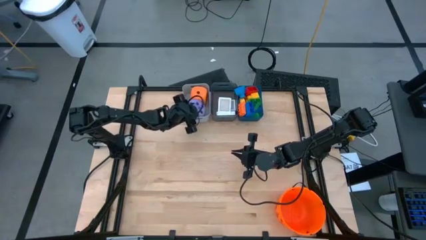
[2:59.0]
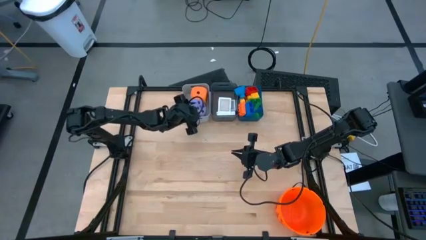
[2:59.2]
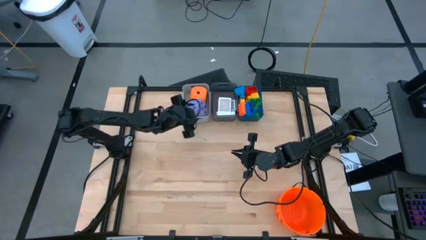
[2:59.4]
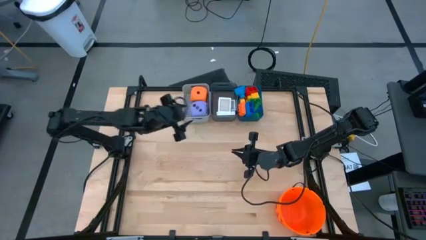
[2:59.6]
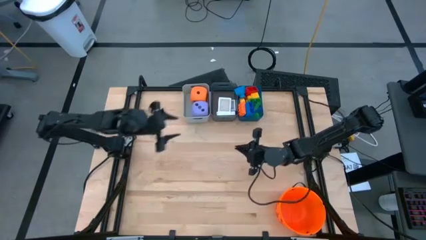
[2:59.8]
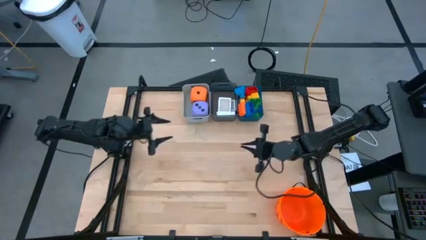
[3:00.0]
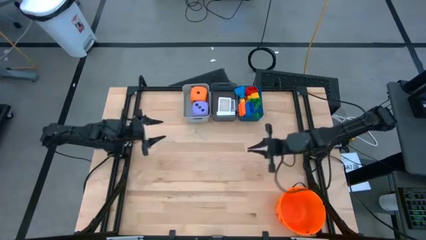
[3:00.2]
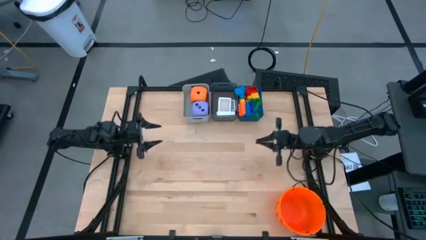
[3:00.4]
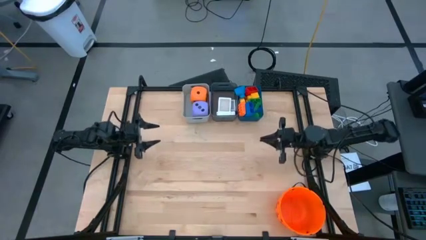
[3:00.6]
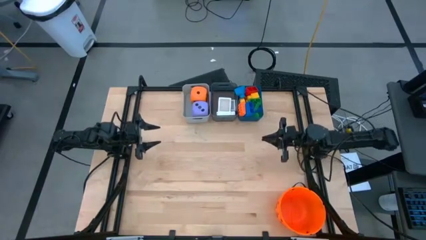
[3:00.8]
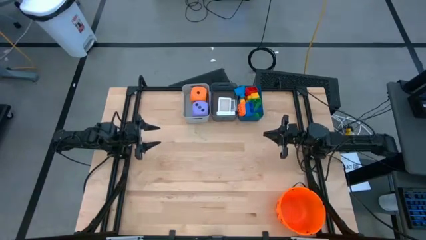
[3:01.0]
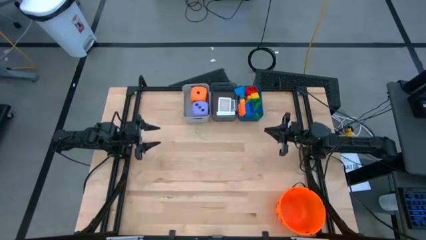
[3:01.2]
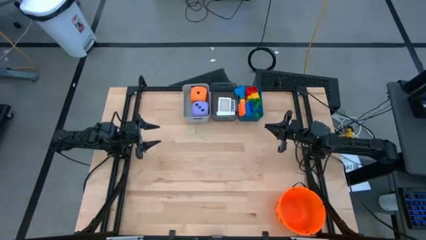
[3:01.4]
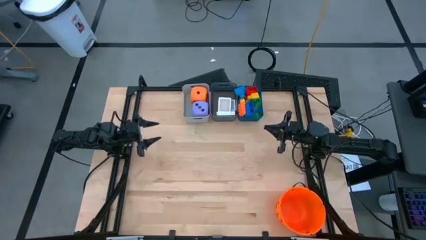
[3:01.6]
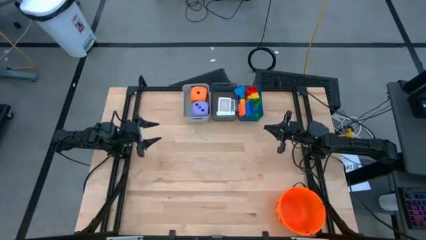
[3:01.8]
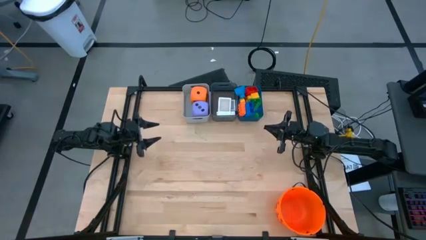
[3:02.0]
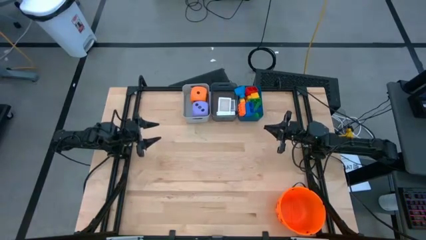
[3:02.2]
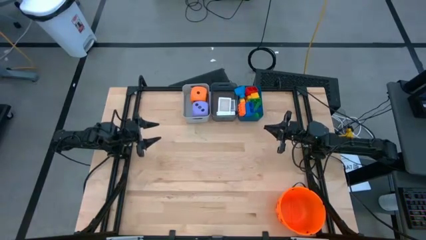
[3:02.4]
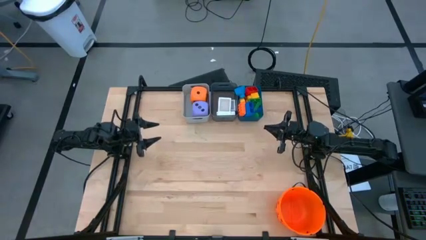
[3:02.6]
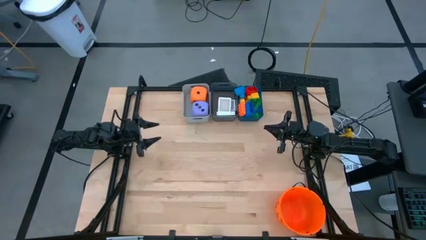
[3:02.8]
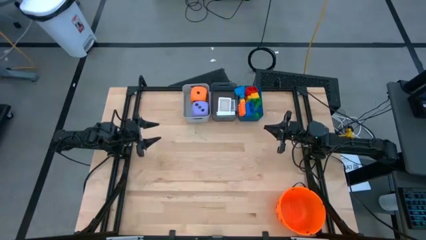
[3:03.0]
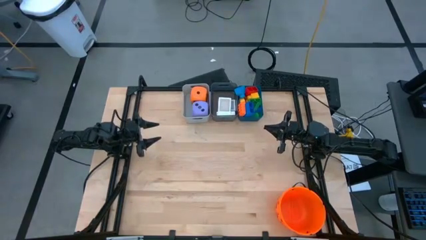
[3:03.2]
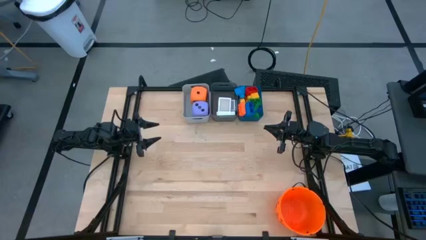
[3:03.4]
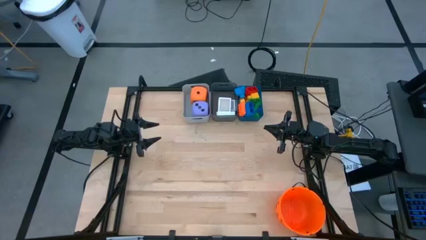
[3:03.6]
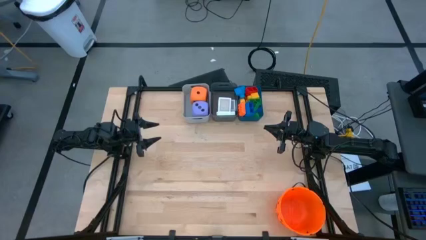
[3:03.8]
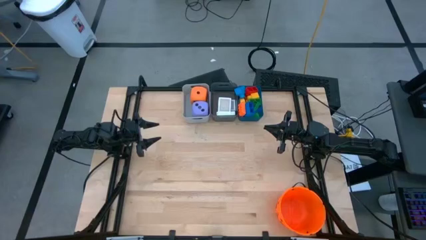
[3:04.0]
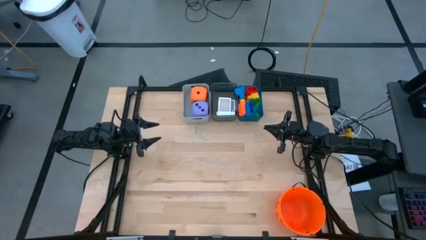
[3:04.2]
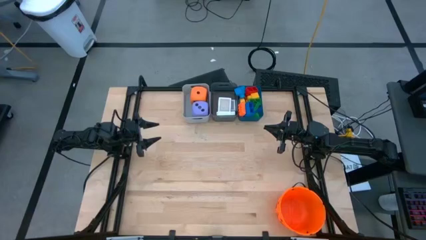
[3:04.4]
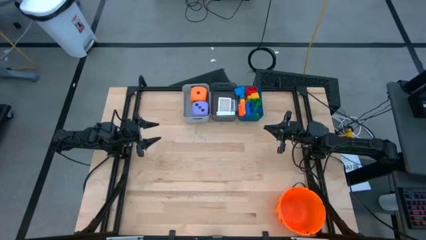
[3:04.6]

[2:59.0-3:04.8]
Task: Pick & Place Toys
Return to Home Position

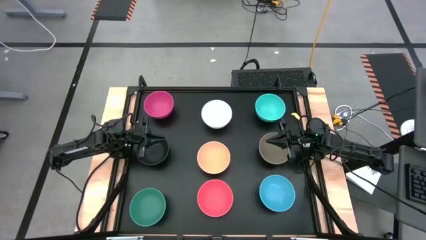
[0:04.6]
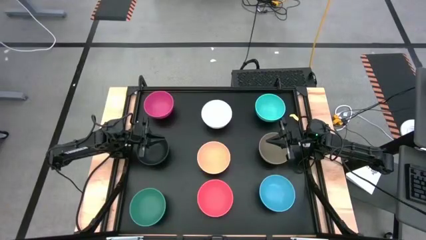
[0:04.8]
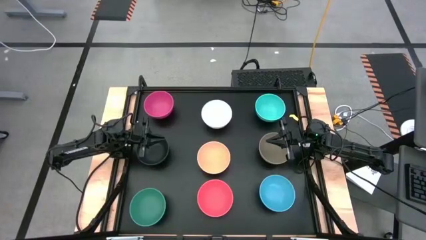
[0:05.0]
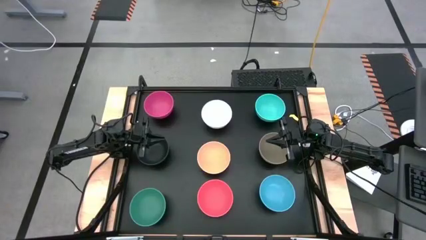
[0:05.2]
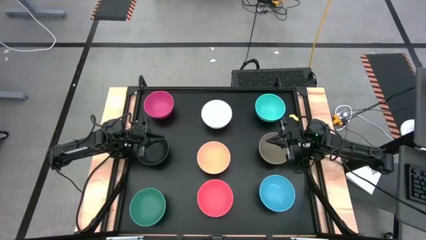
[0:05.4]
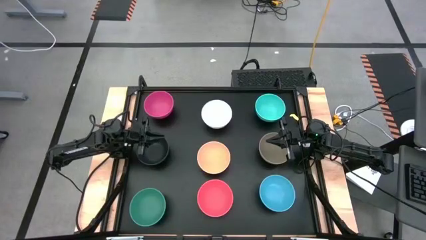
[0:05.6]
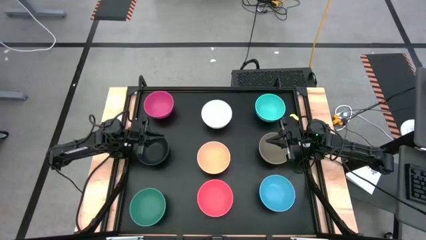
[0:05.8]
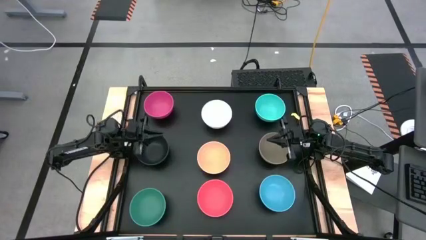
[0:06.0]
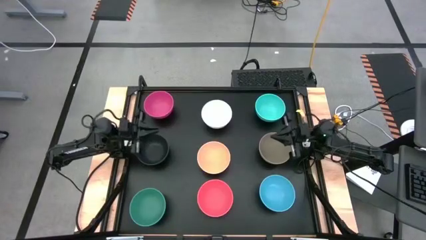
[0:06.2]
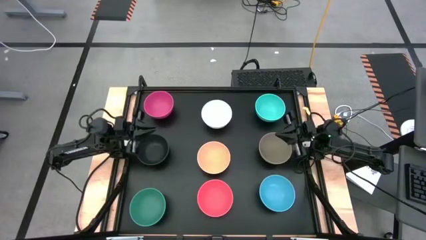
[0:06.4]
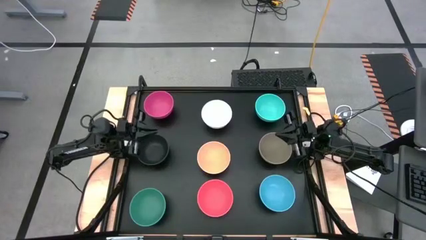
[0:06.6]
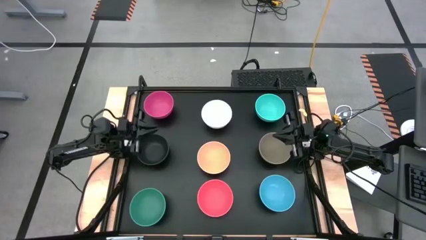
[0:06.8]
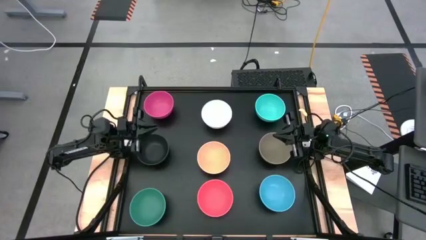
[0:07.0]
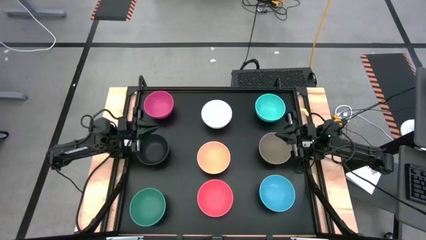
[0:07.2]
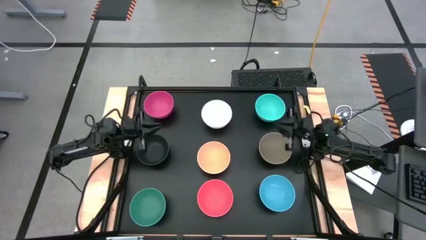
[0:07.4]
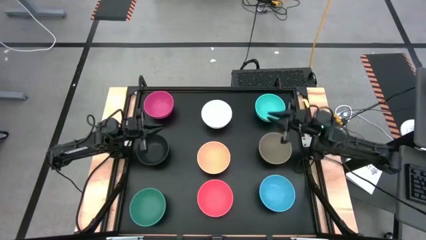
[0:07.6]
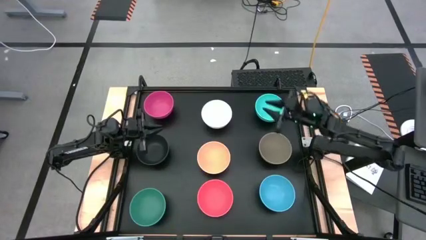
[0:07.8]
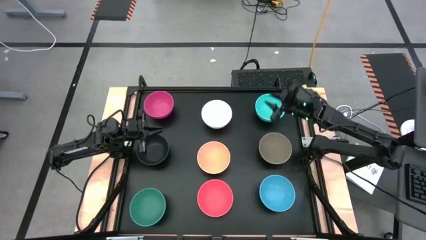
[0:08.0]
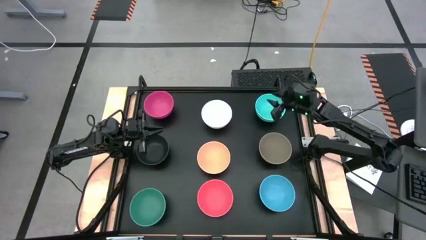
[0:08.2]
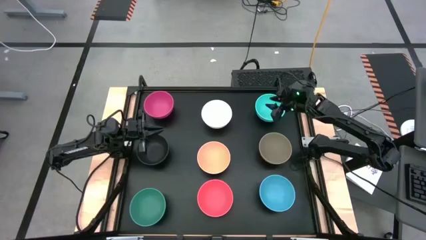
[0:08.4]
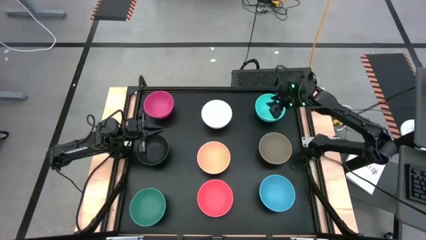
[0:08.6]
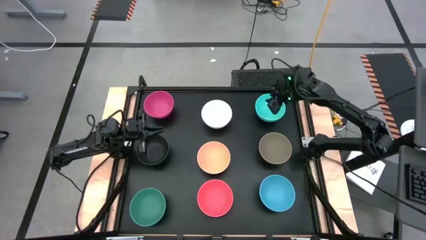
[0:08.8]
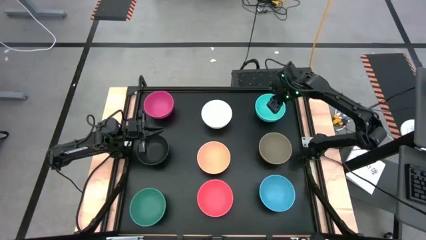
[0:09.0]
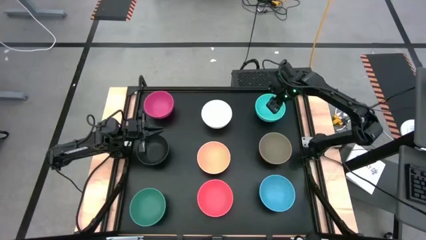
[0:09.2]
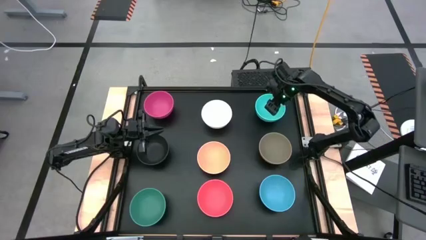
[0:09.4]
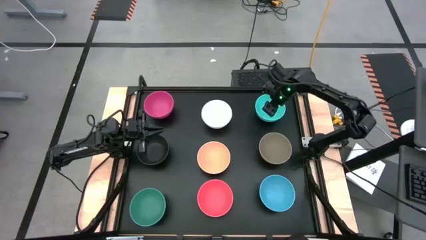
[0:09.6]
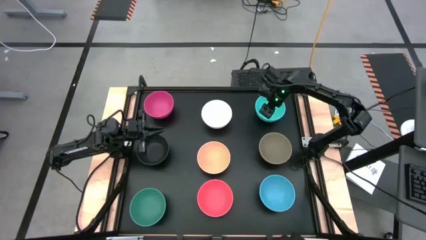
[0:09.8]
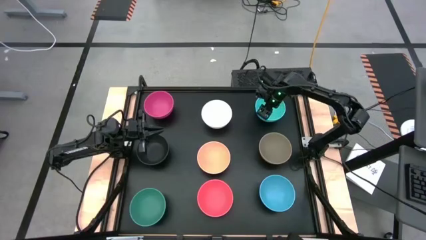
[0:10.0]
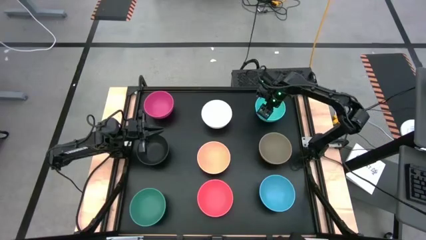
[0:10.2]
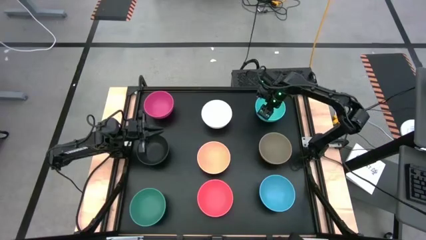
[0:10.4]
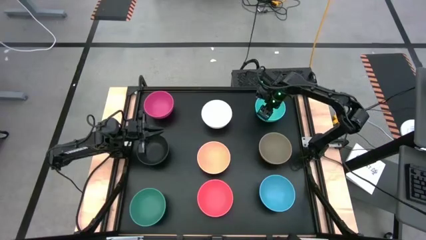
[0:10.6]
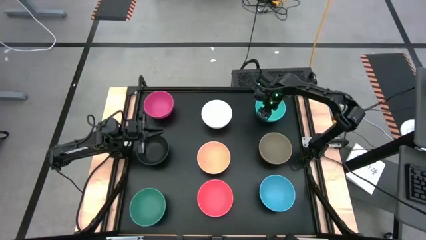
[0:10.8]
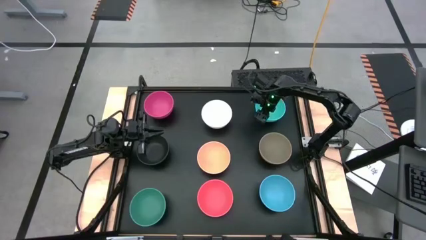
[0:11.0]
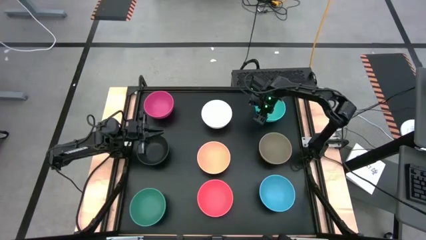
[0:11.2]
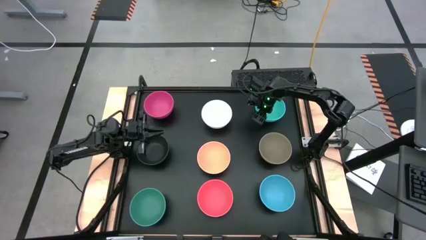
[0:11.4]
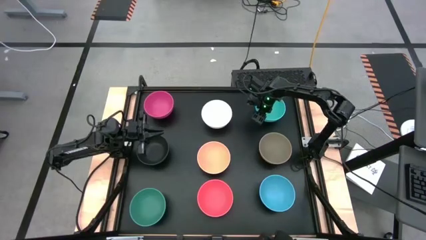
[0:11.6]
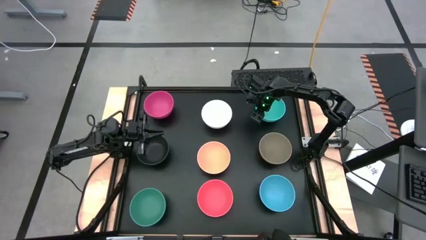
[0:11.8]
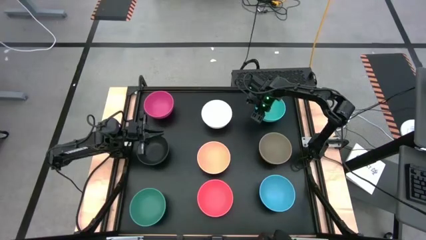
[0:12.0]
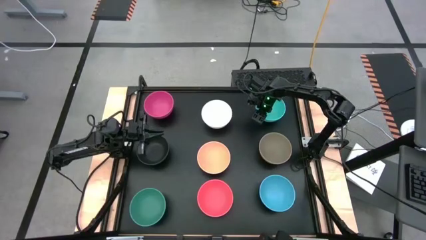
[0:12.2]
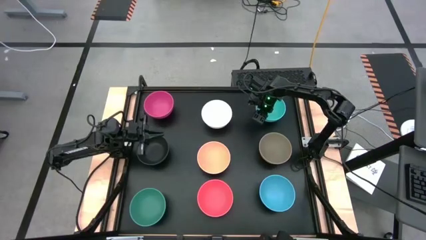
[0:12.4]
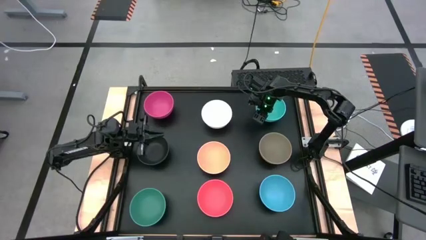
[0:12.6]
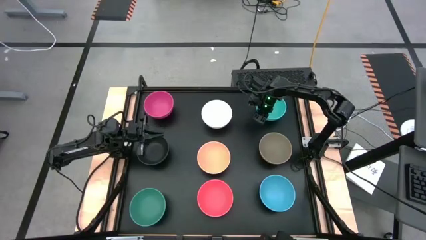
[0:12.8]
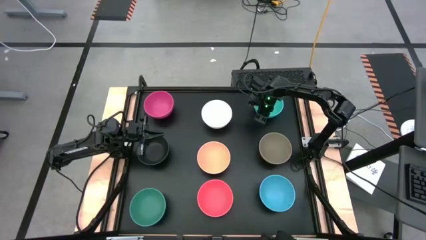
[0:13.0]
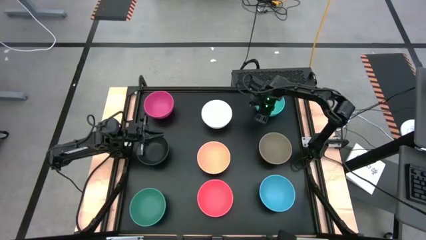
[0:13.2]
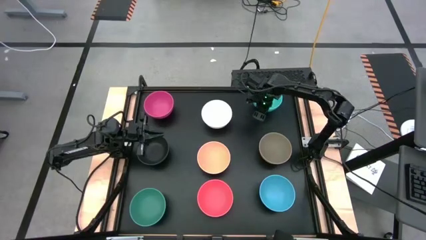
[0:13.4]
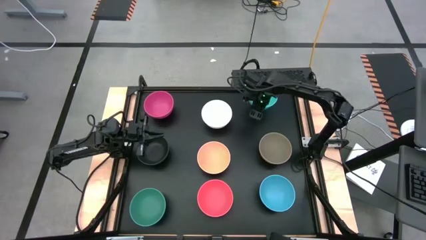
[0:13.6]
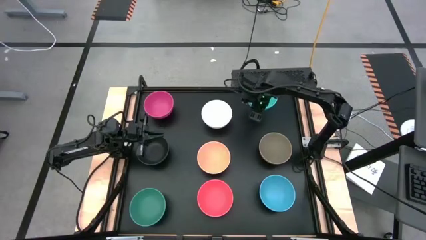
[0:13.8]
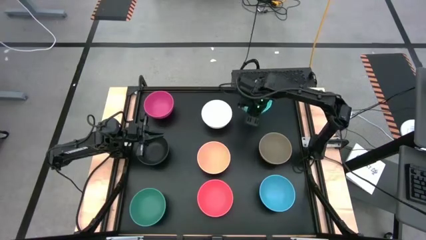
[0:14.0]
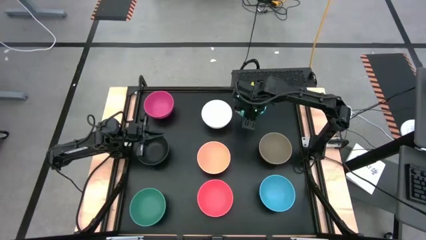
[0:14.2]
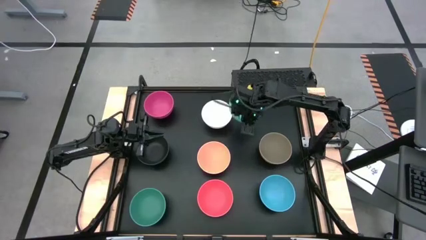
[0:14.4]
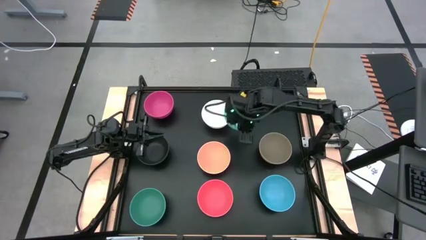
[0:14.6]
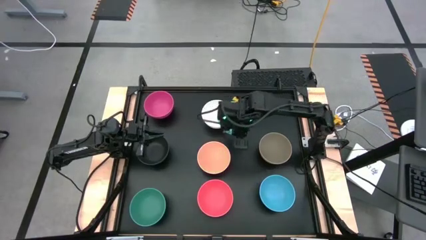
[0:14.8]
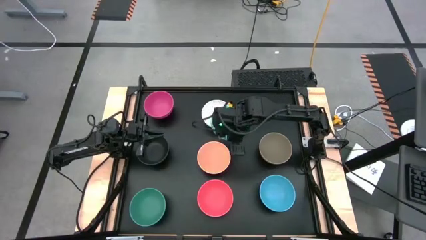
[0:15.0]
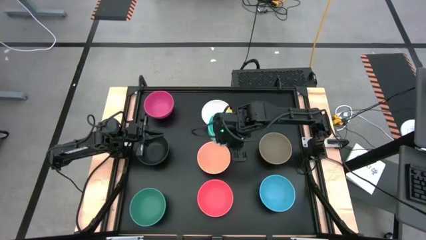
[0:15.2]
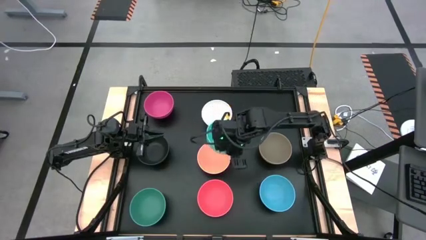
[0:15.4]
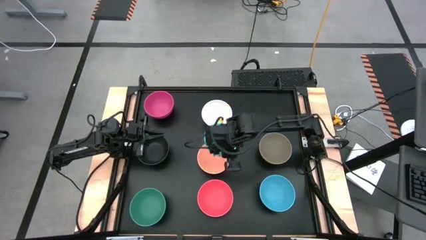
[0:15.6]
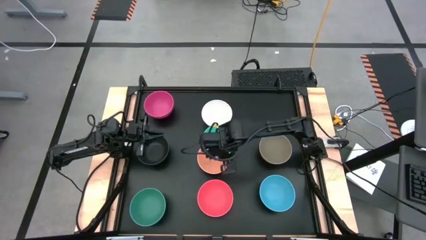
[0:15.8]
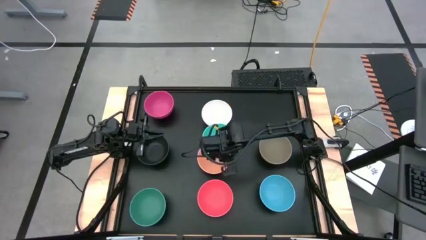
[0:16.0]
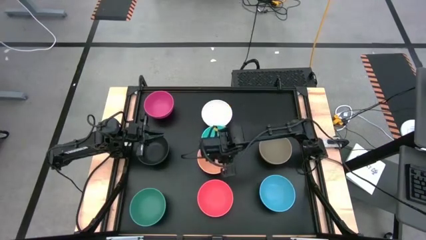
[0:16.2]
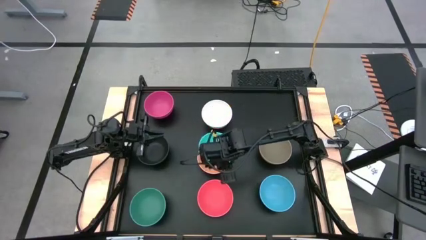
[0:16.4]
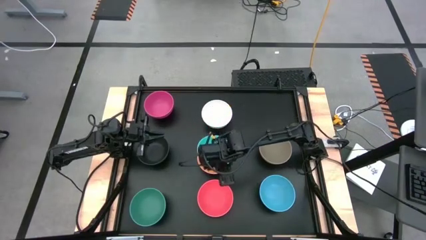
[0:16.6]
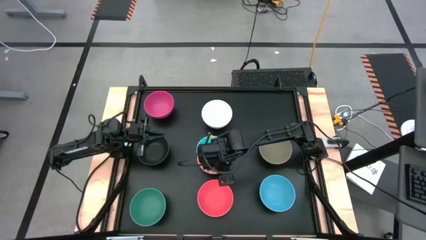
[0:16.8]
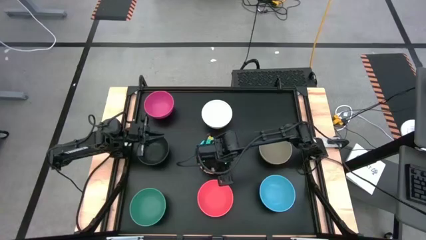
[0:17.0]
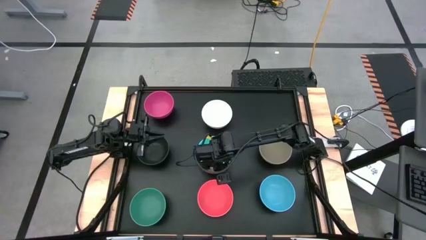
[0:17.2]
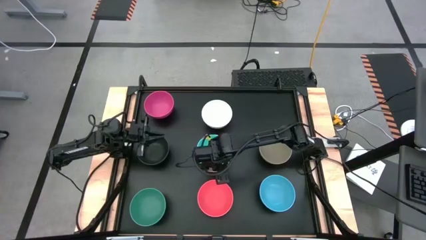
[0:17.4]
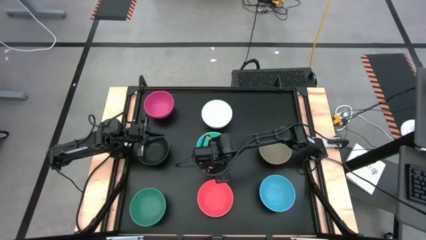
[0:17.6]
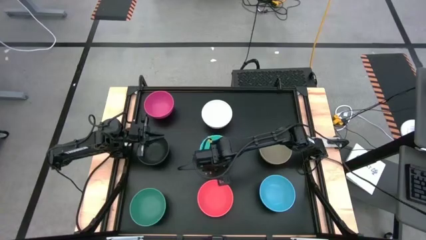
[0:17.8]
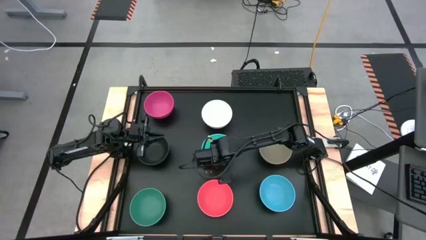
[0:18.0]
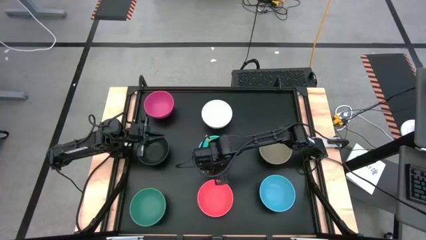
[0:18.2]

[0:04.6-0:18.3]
Task: Nest bowls inside each other
Stack the light blue bowl on top of the orange bowl
